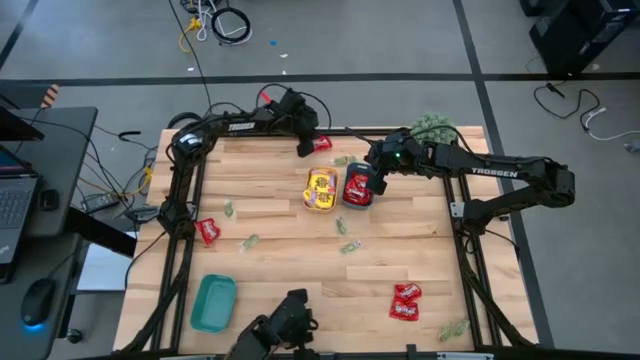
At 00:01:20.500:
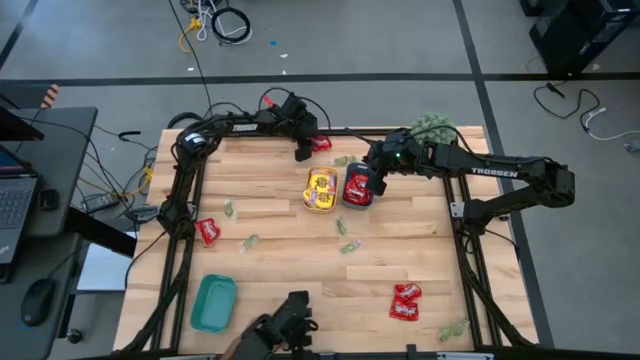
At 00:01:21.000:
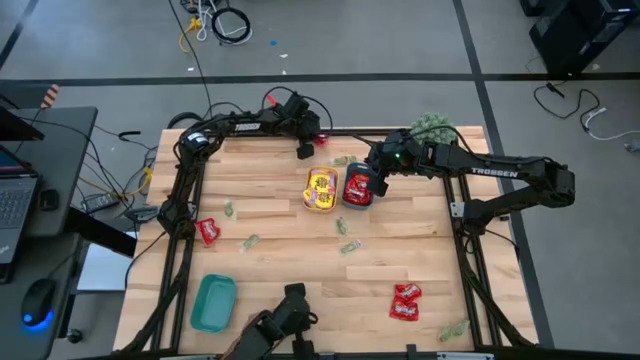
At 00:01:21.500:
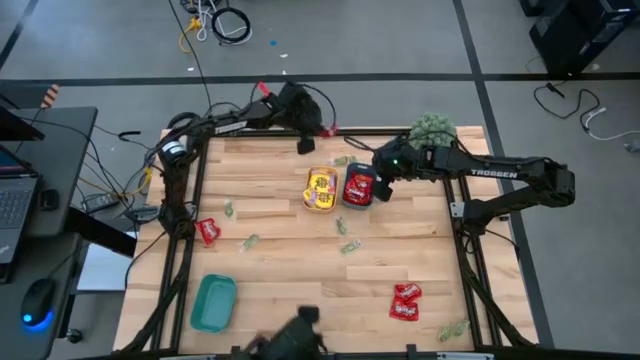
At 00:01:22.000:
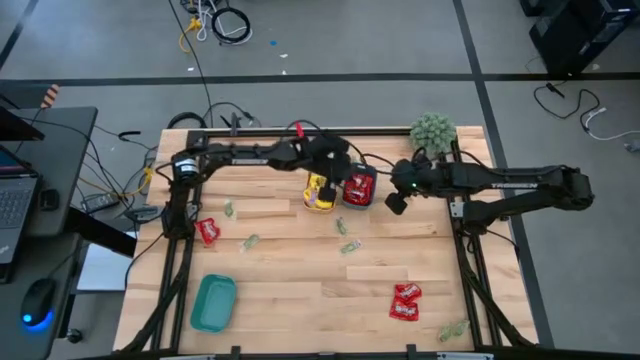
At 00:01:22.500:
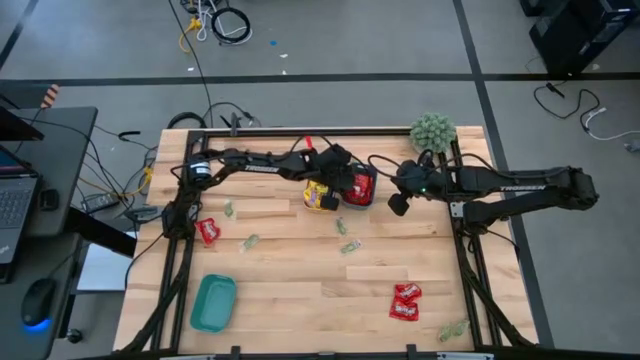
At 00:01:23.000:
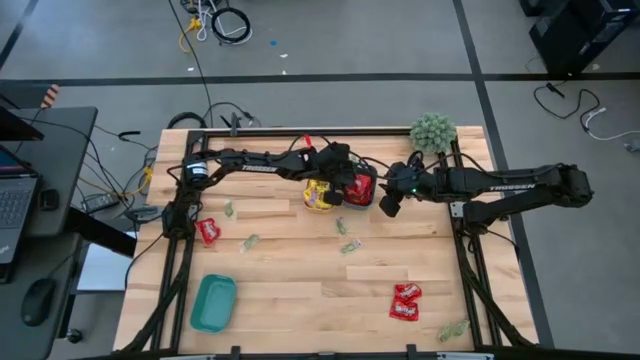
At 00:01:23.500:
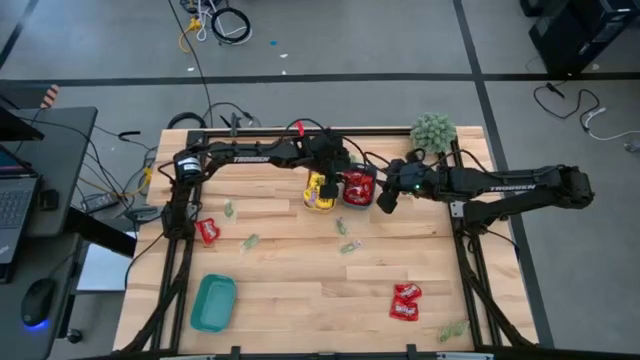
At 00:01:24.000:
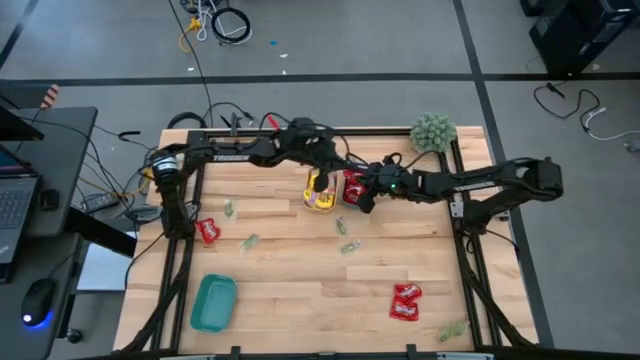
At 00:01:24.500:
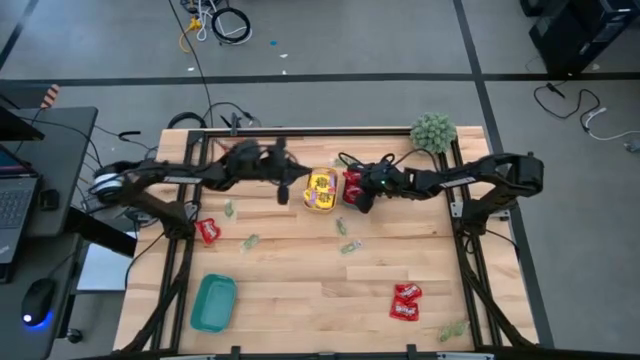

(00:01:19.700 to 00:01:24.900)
Task: Sort candy
Put the red packet of candy into the blue bin

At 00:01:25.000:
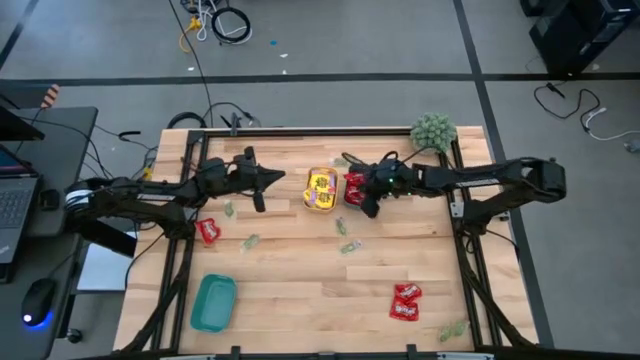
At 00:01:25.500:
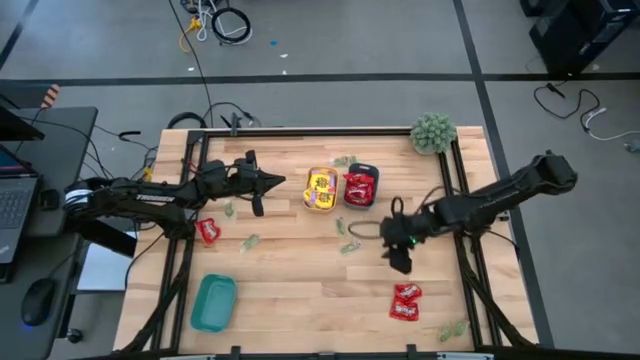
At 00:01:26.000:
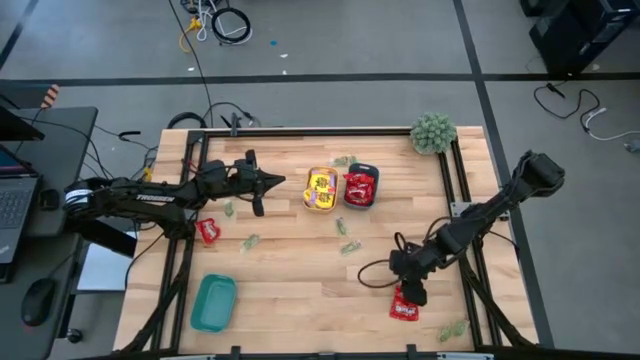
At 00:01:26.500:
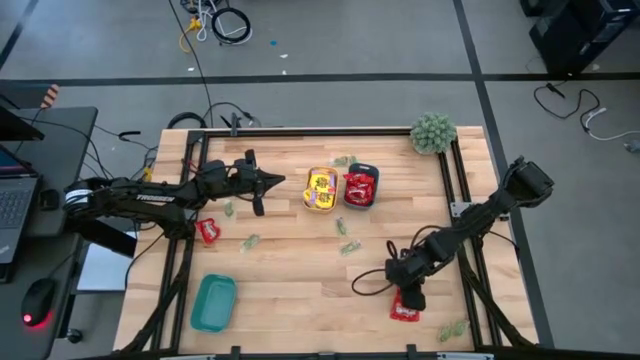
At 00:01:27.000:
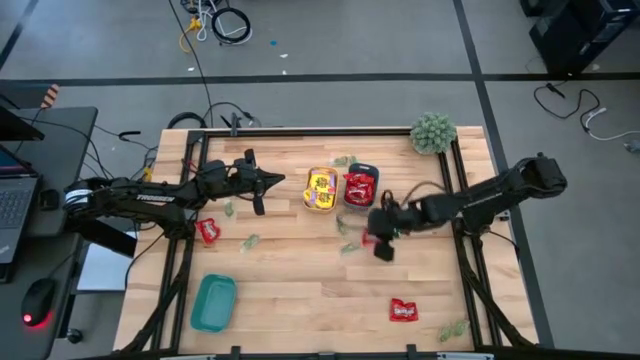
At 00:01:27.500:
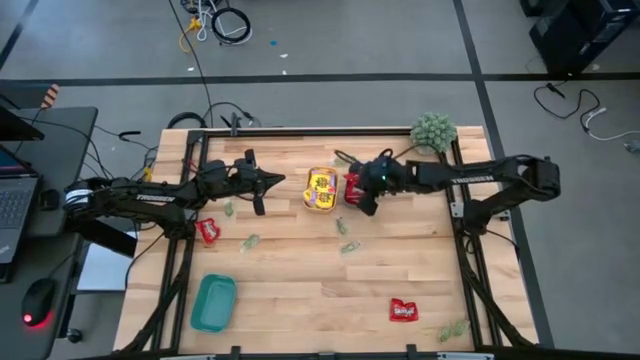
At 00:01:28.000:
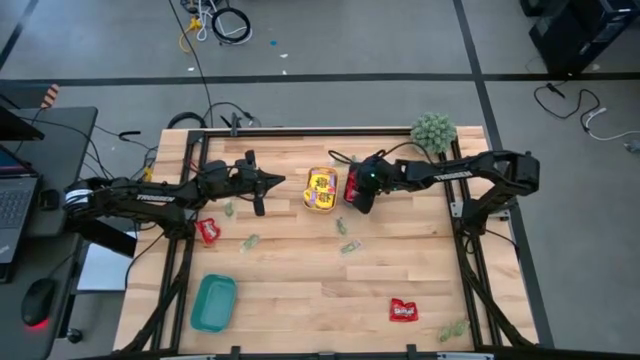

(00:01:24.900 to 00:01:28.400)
Put the red packet of candy into the blue bin

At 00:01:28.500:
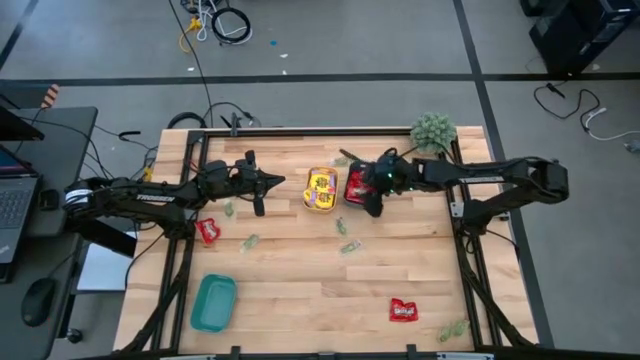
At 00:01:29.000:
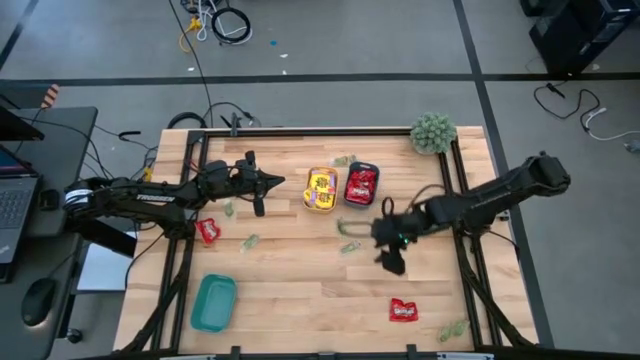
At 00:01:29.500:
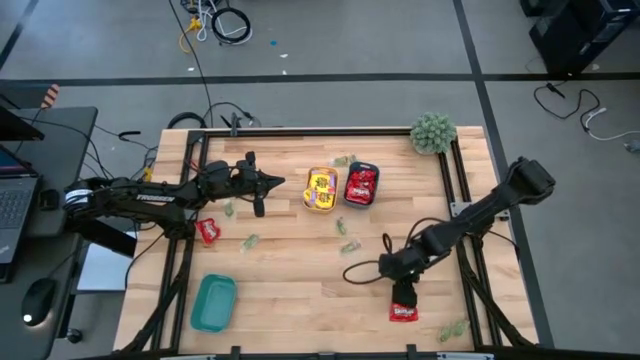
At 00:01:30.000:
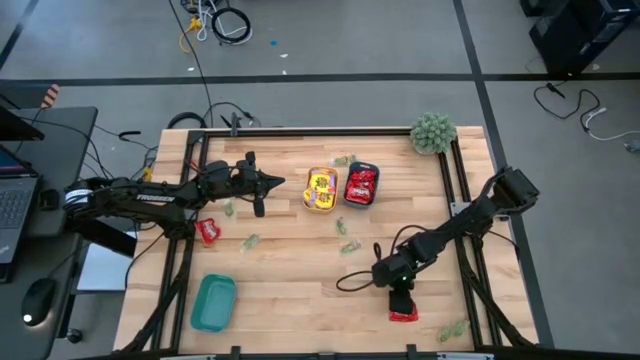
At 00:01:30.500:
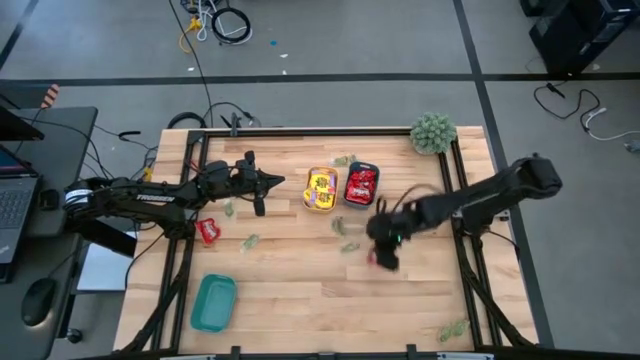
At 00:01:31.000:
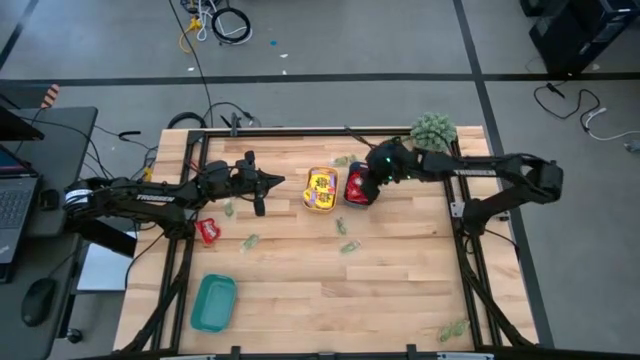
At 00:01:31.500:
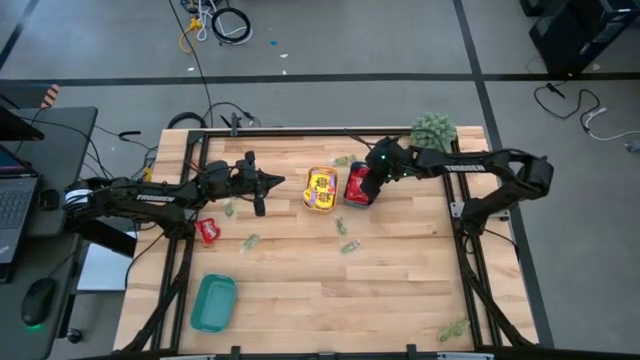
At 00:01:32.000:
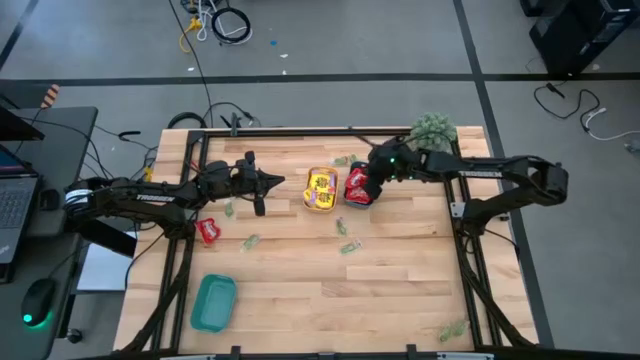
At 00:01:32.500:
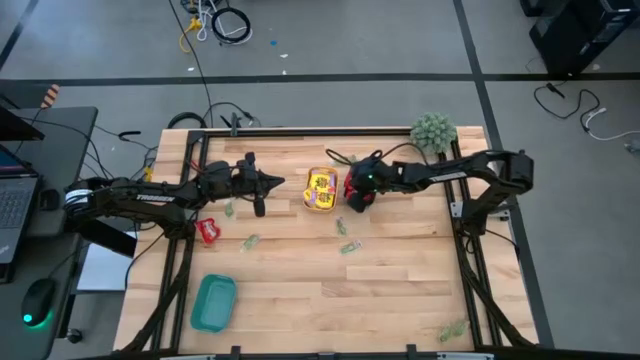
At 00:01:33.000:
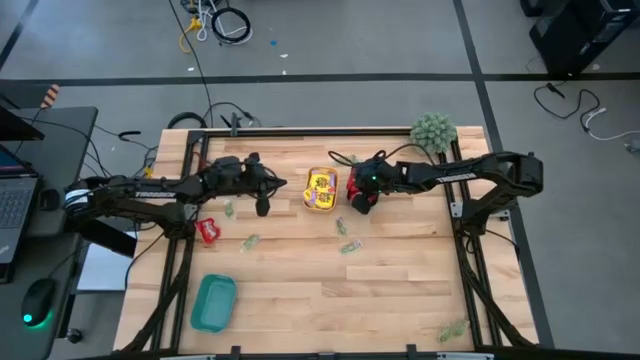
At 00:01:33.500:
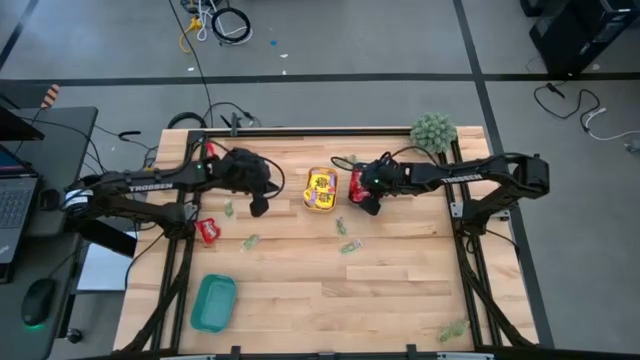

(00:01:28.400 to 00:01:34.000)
Put the red packet of candy into the blue bin

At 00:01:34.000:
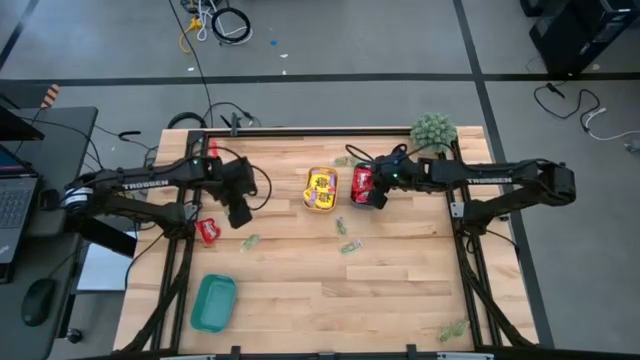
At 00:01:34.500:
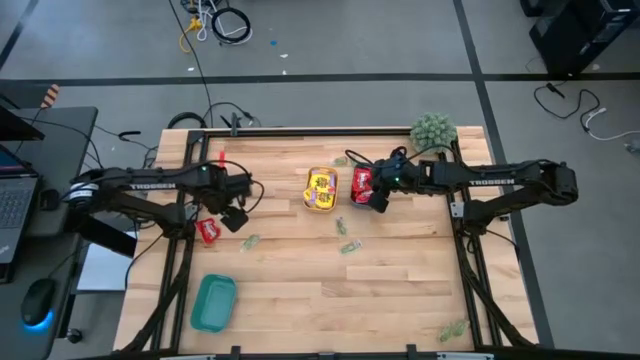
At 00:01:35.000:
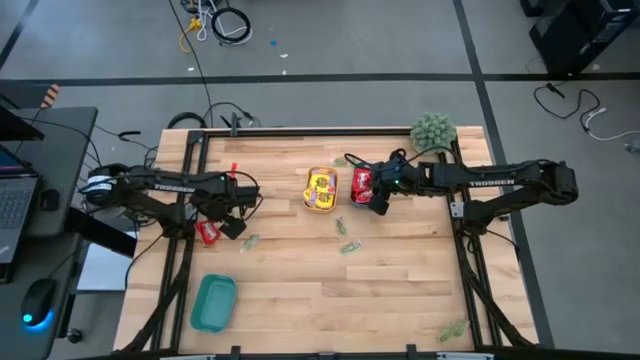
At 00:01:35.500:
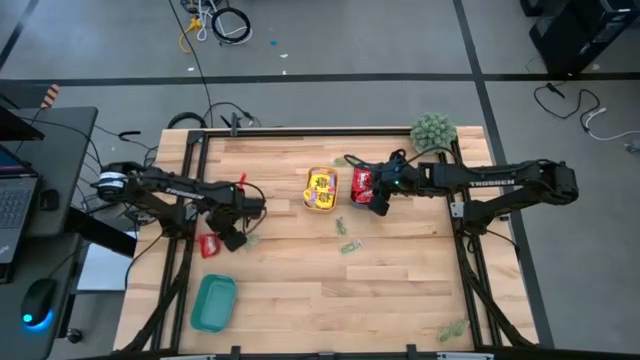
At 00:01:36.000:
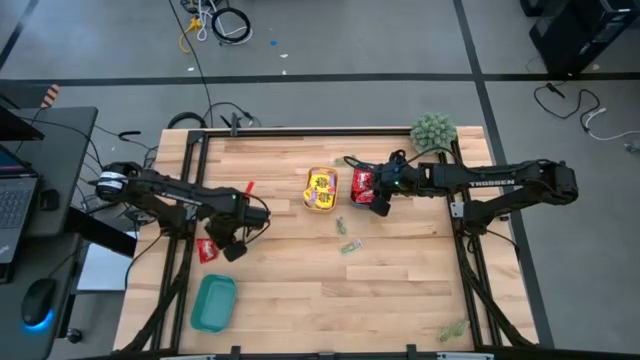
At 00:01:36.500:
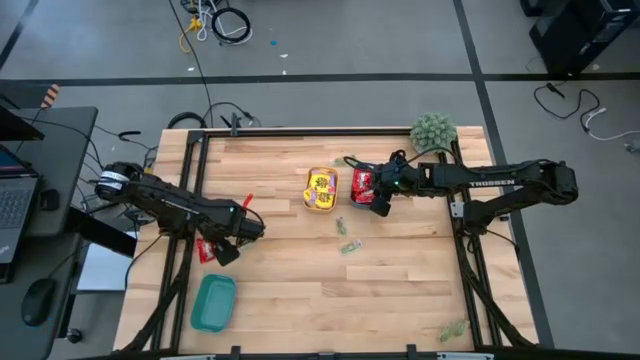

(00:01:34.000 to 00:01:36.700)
Put the red packet of candy into the blue bin

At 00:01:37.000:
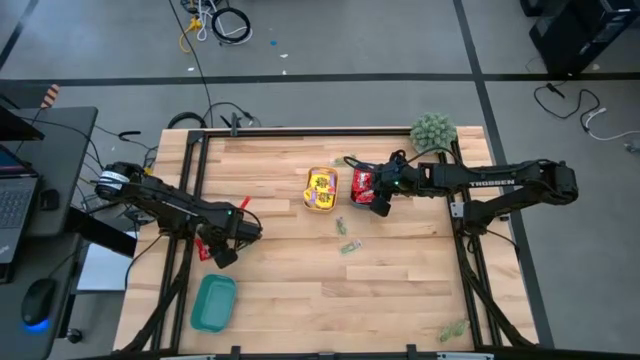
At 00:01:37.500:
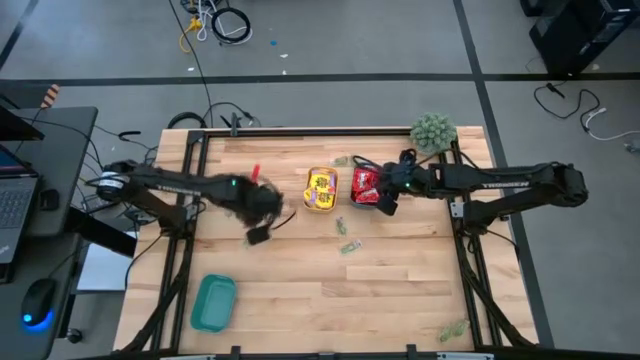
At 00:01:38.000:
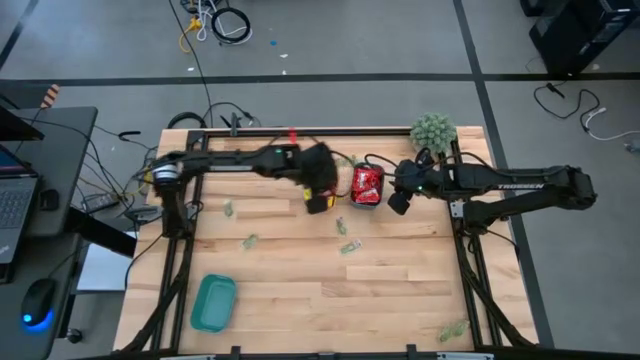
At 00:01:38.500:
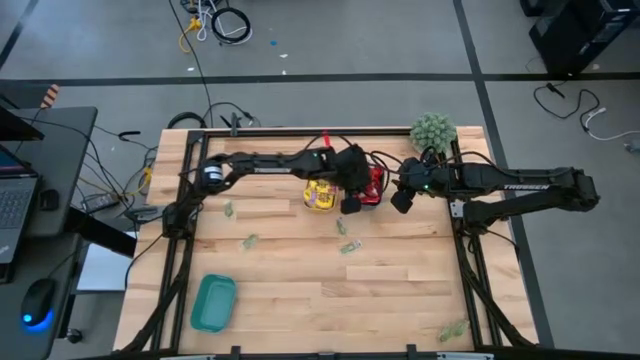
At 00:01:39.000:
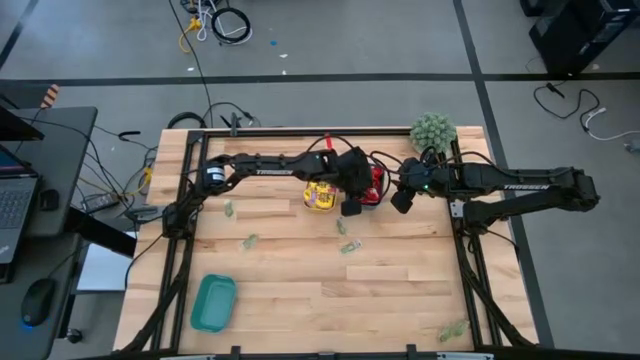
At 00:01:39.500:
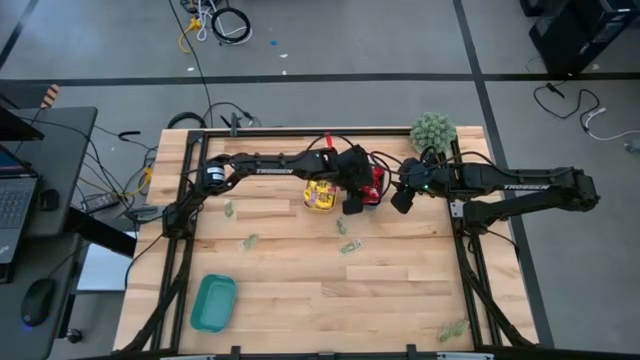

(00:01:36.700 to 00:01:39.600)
Put the red packet of candy into the blue bin
